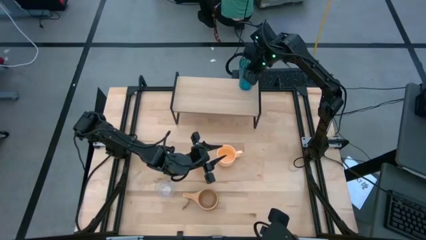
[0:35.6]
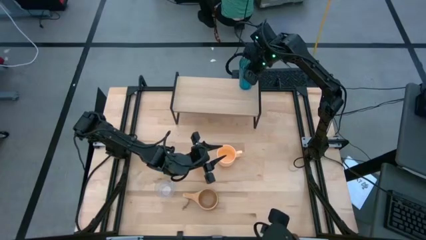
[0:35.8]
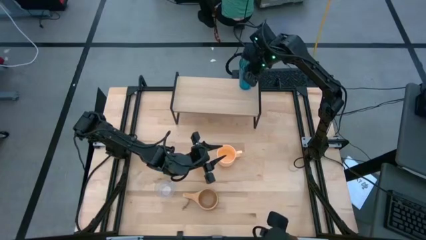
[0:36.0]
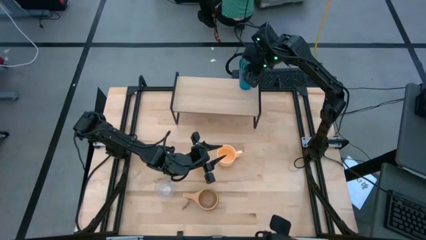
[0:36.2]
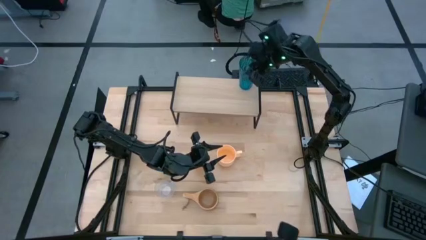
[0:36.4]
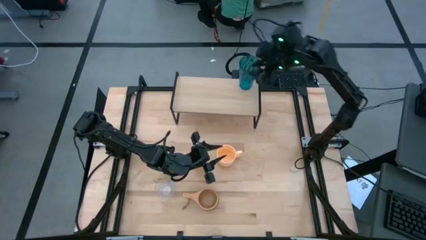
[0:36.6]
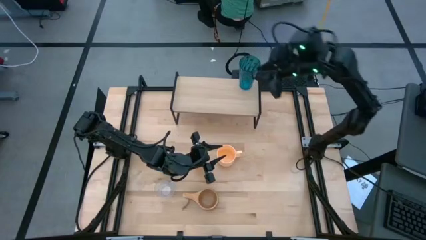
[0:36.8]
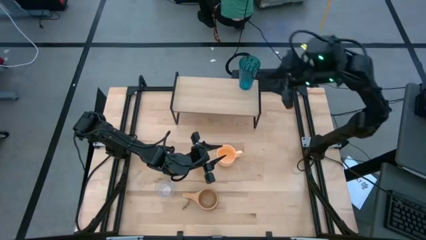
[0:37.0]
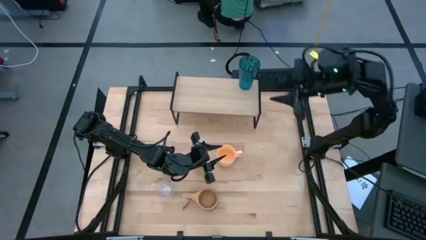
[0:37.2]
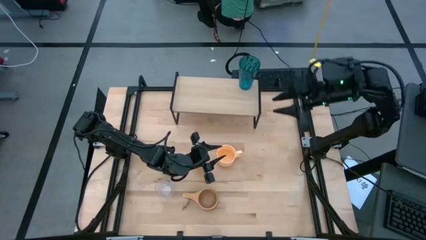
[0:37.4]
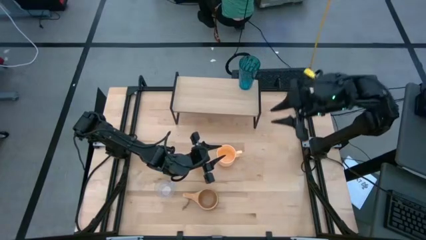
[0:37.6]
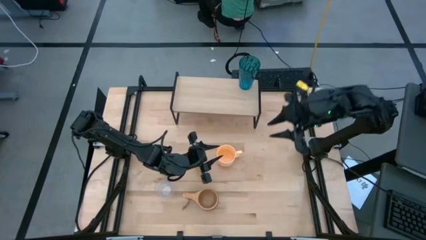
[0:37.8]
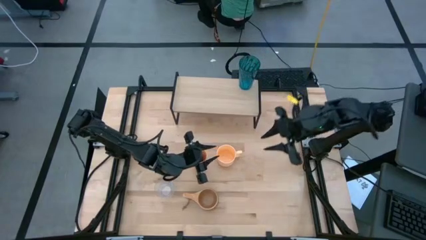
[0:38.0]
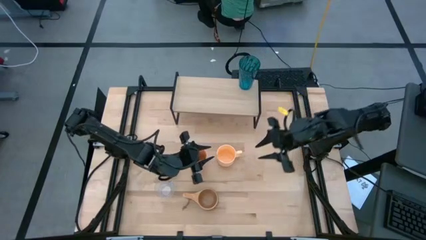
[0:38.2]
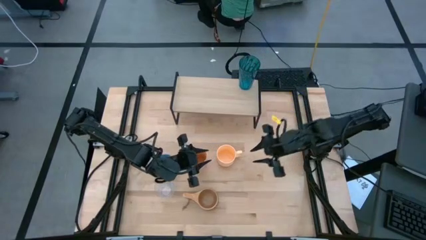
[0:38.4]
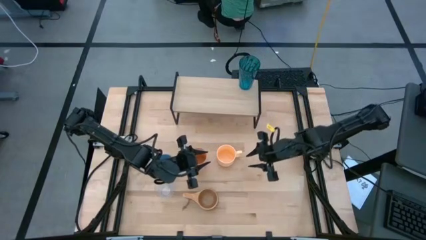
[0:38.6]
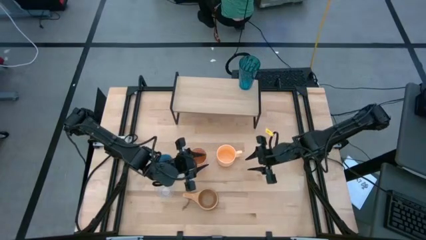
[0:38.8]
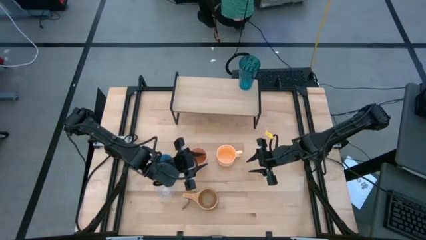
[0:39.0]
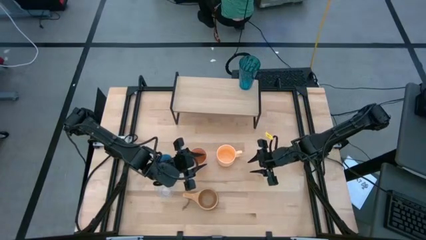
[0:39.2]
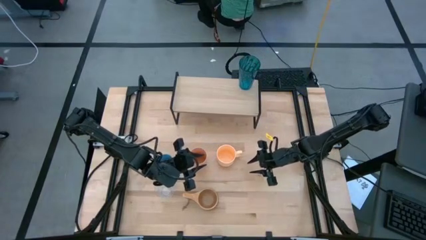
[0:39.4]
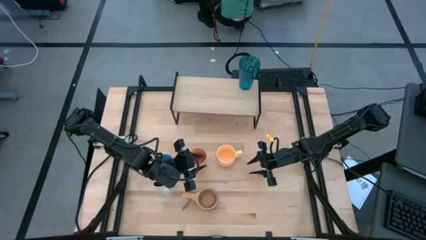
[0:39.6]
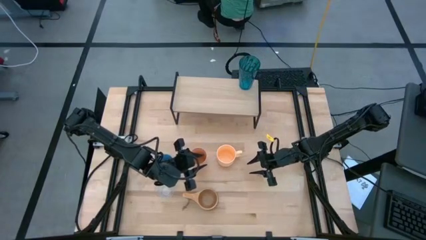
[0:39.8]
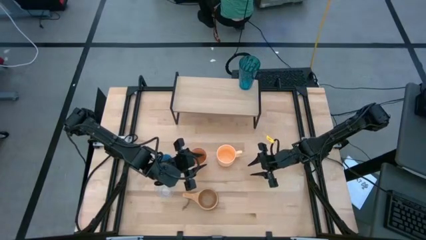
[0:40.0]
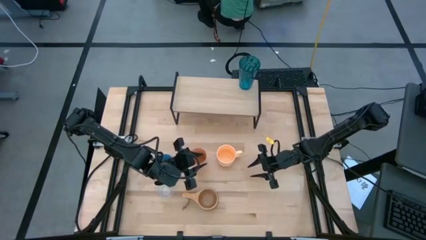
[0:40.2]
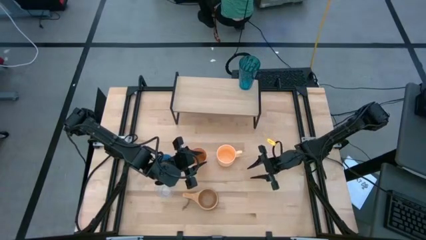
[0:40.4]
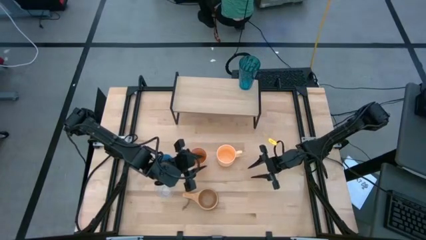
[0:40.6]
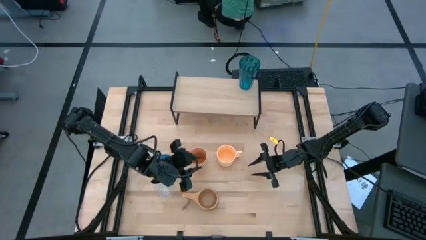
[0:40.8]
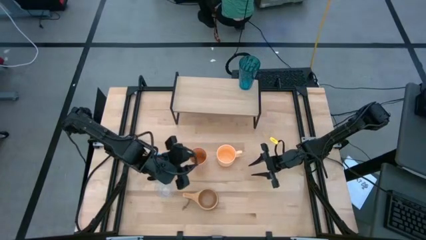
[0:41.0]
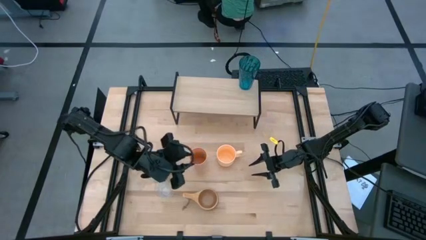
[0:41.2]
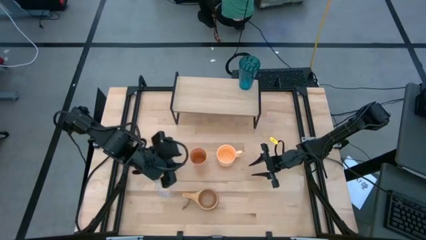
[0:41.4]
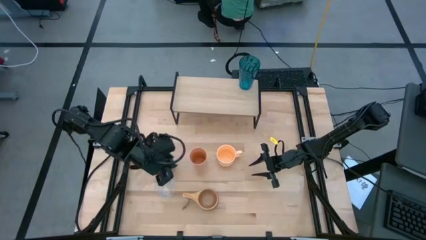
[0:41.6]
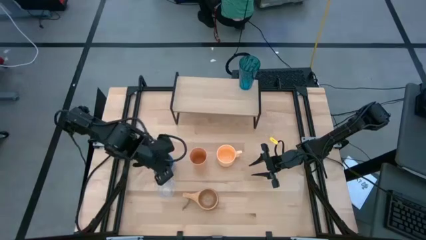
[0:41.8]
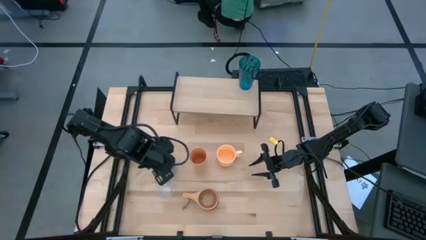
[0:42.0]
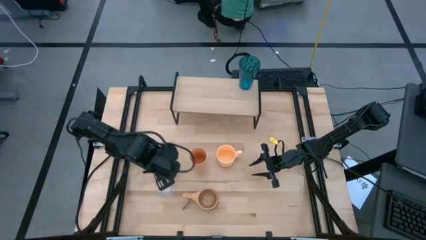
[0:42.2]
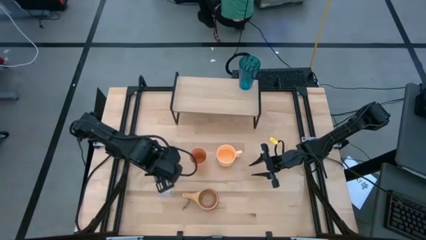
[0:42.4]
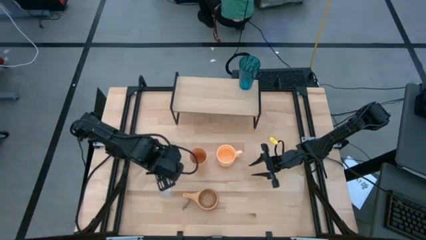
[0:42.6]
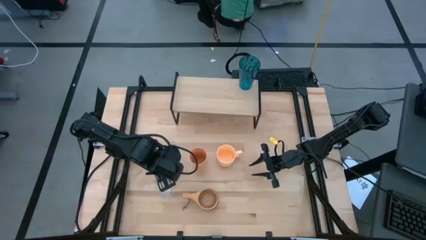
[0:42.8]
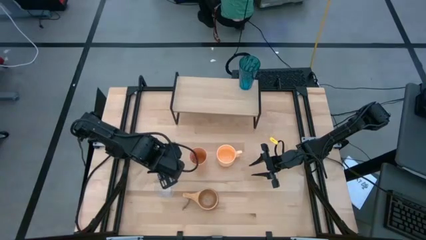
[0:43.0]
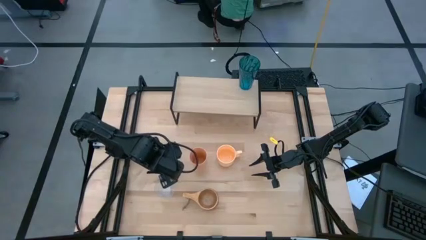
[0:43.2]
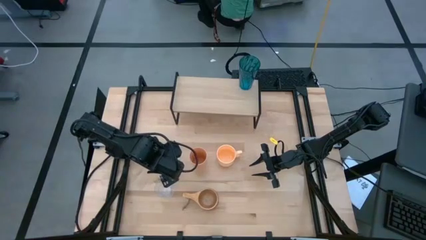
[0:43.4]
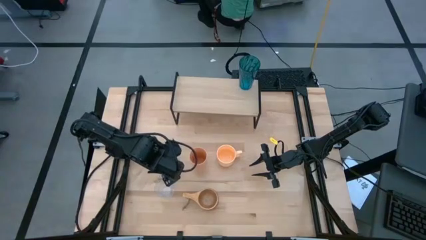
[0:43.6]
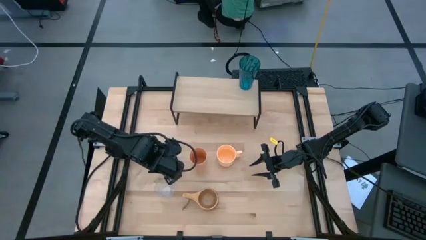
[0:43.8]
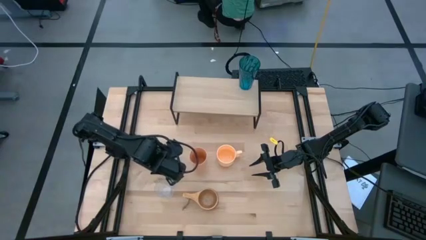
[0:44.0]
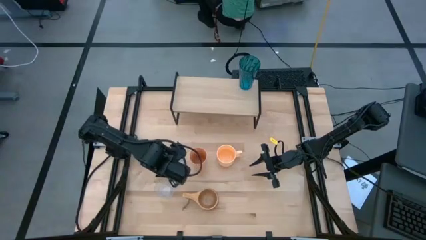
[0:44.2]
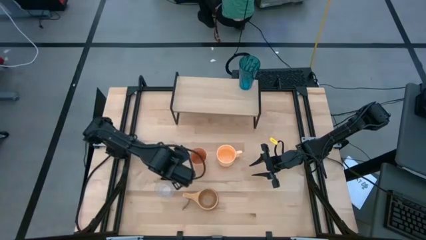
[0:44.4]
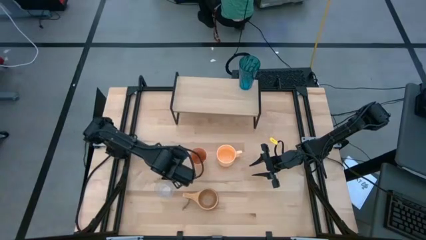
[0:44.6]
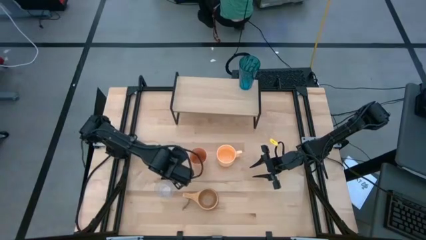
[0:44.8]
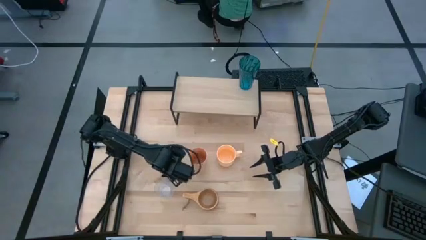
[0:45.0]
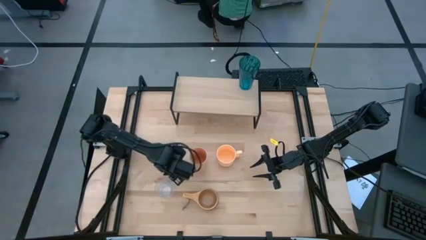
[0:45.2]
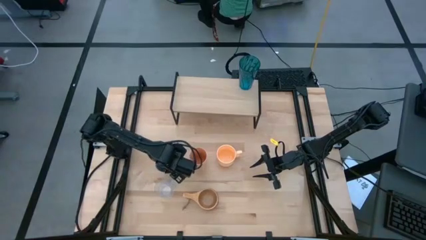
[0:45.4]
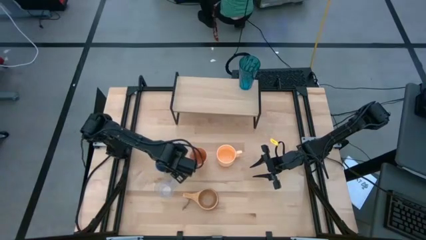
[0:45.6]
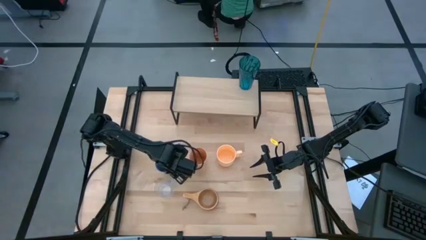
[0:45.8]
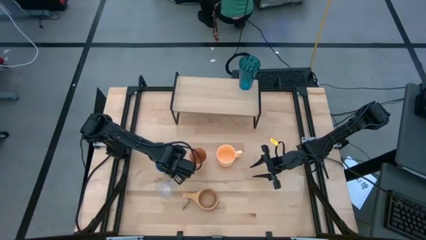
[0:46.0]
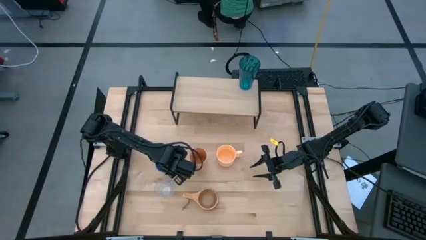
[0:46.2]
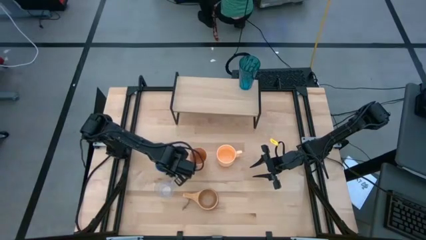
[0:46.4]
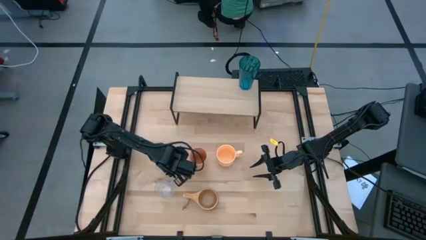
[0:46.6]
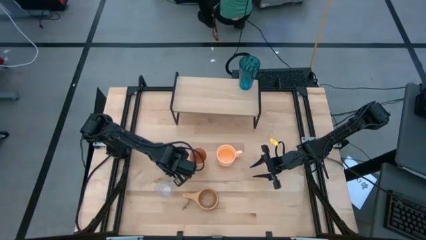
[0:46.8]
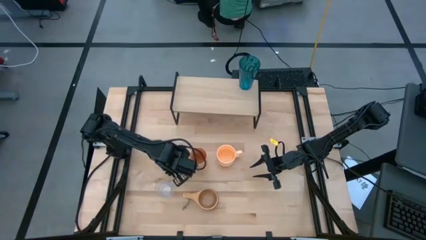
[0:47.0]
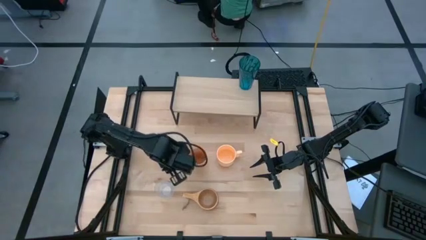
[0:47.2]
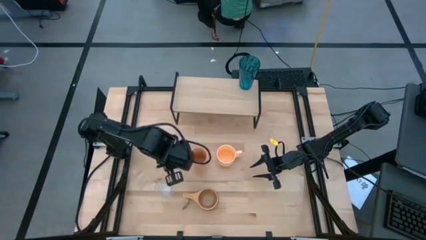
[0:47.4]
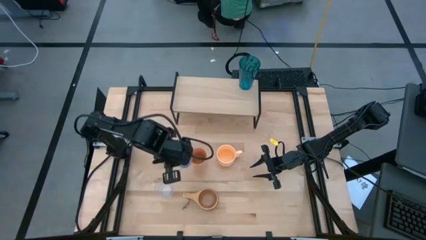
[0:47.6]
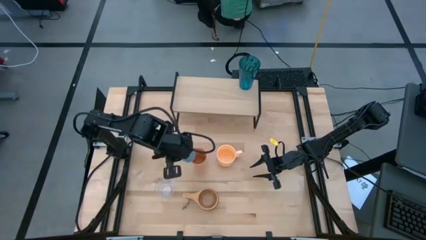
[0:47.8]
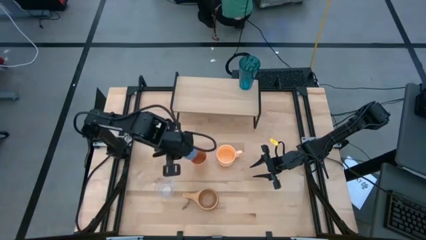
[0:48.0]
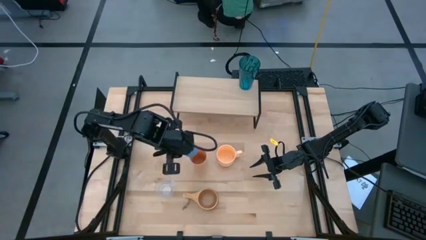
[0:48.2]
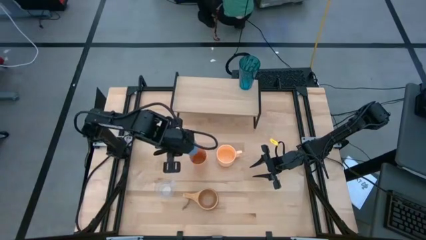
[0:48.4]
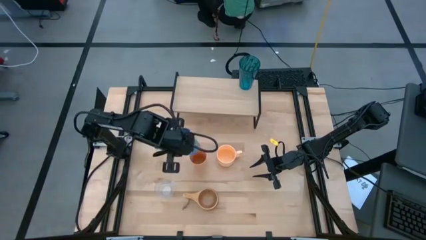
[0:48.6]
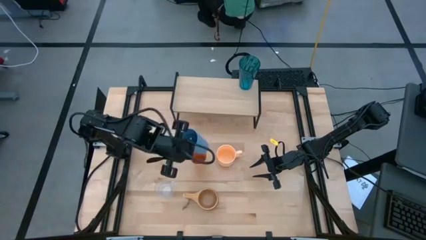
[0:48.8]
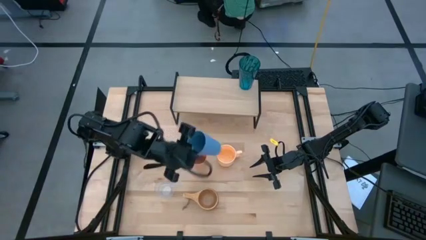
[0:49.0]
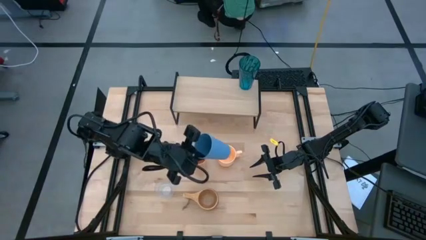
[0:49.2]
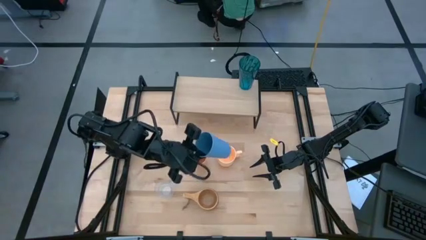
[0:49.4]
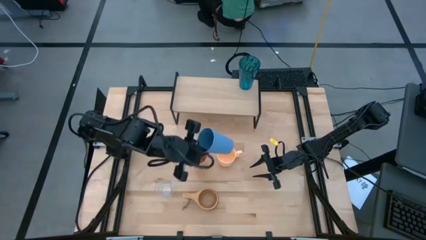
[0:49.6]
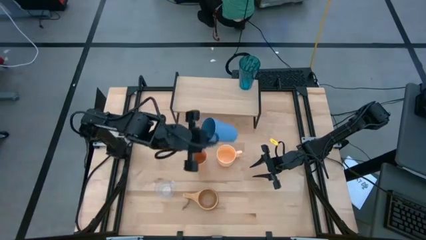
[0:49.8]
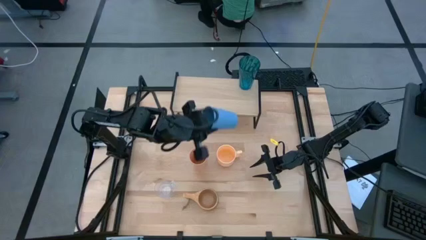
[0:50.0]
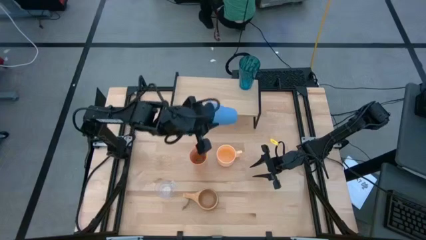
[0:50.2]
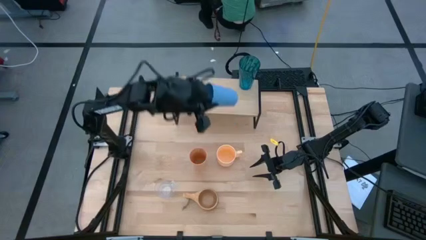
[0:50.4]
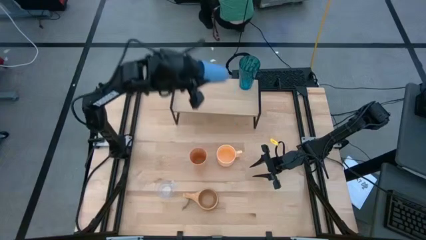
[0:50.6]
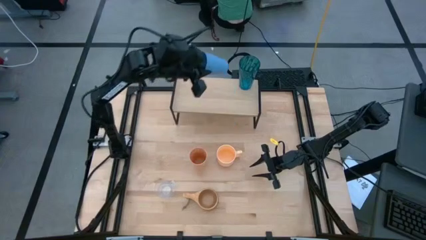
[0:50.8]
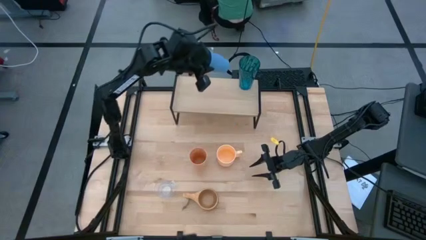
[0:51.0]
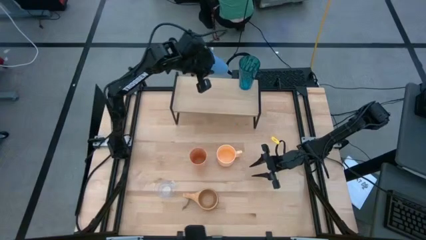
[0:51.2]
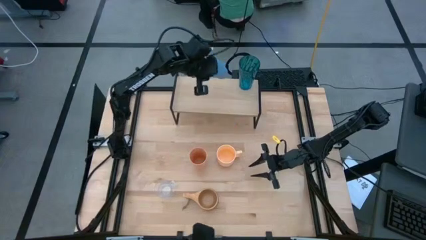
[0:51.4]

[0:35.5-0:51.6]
Task: Stack small to large cups/mugs on shelf
Put the light blue cup on the shelf
